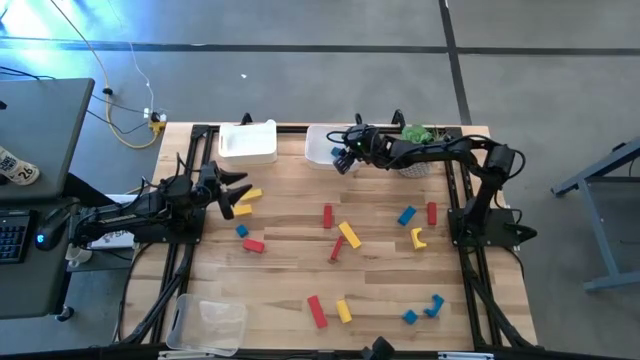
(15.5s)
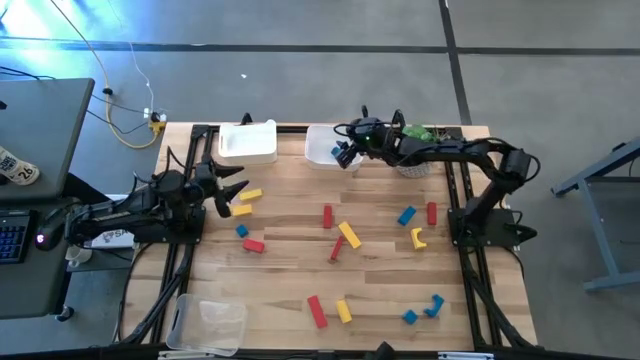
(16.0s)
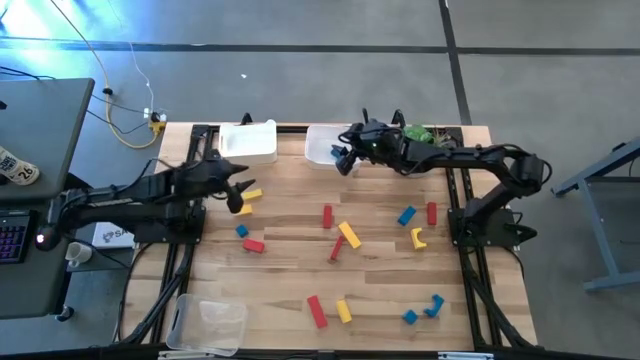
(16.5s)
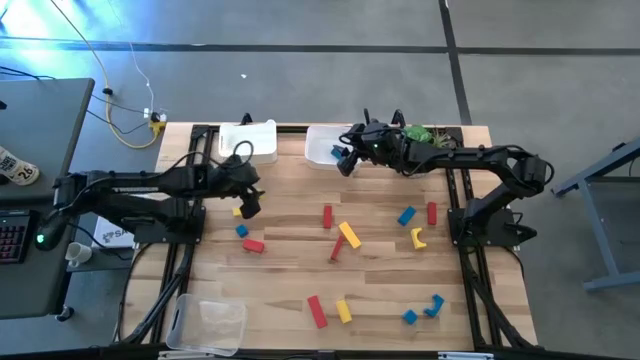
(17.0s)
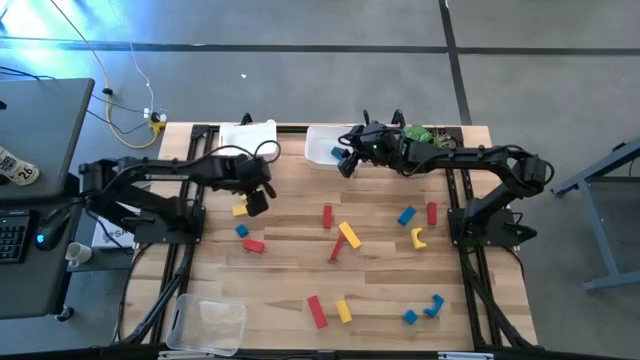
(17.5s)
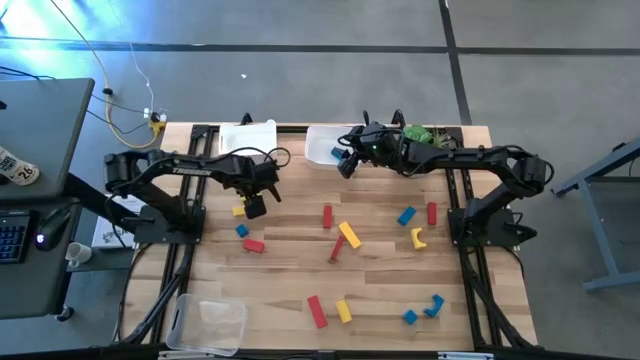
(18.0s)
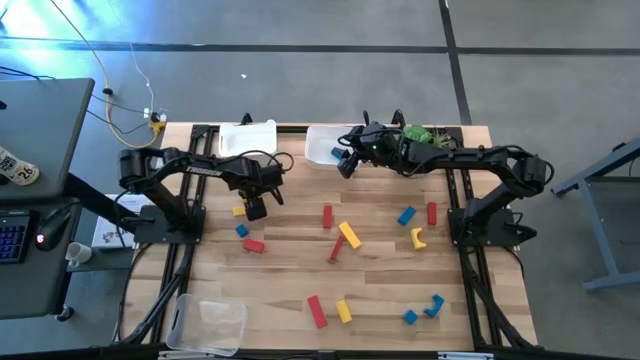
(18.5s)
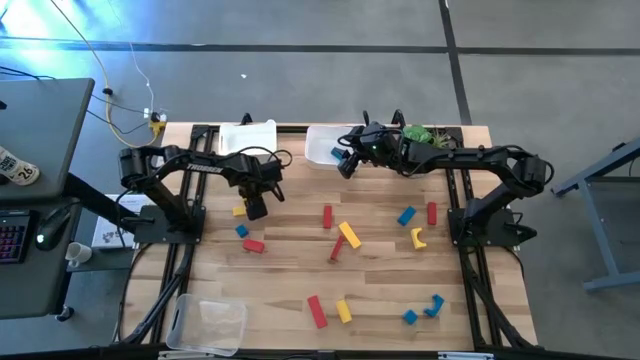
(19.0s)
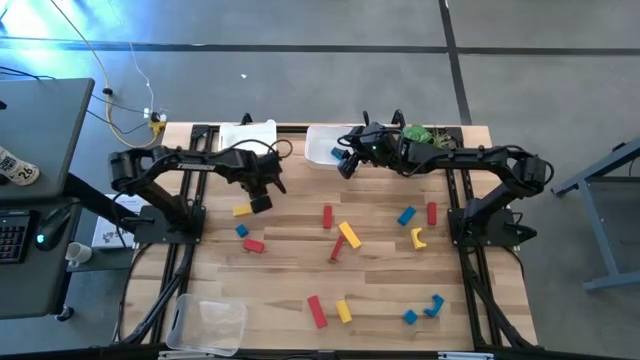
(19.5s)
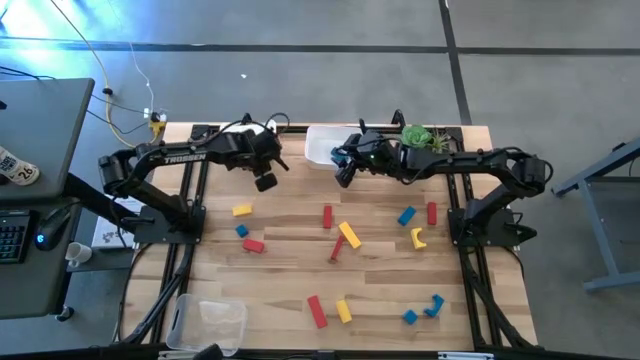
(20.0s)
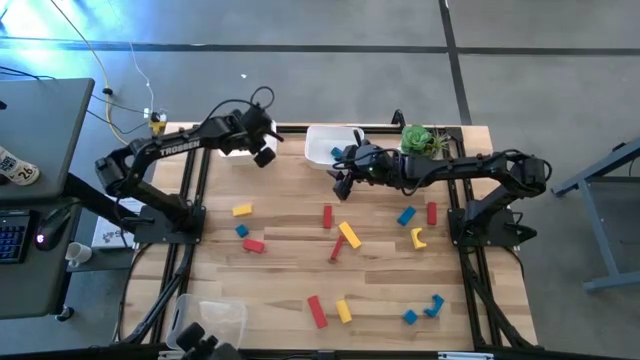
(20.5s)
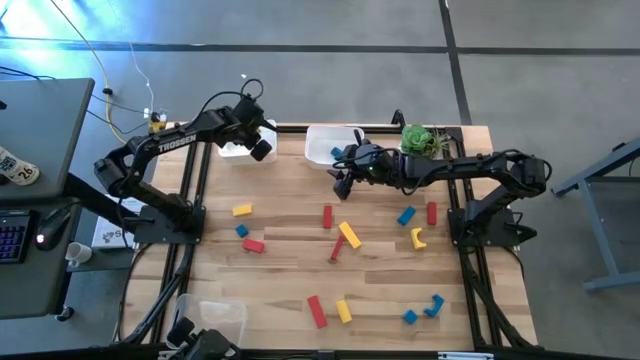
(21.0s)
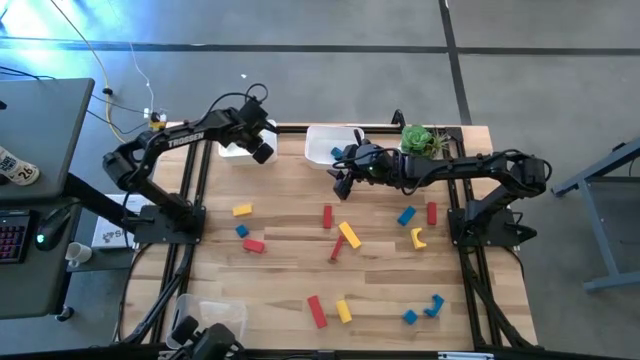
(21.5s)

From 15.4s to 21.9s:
Task: Sort & place blocks by color
Put the yellow block into the left white bin

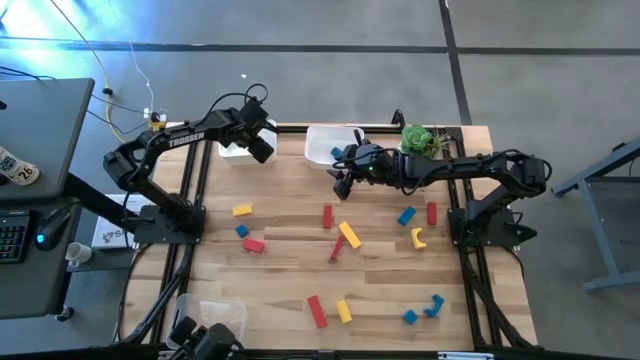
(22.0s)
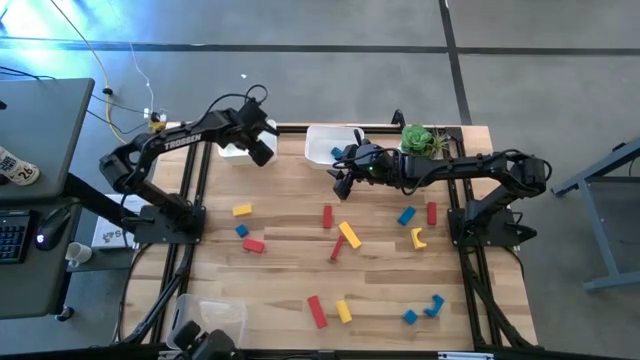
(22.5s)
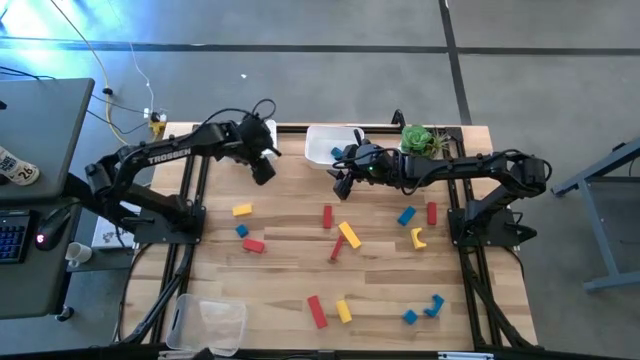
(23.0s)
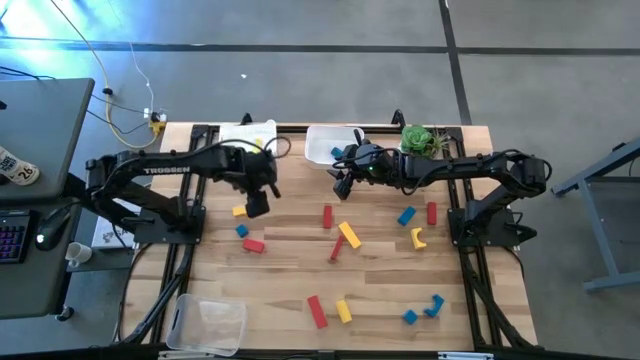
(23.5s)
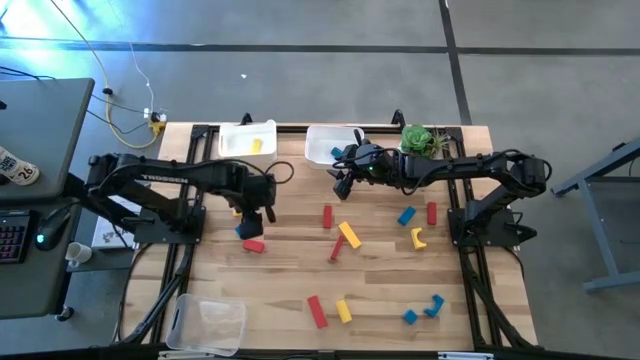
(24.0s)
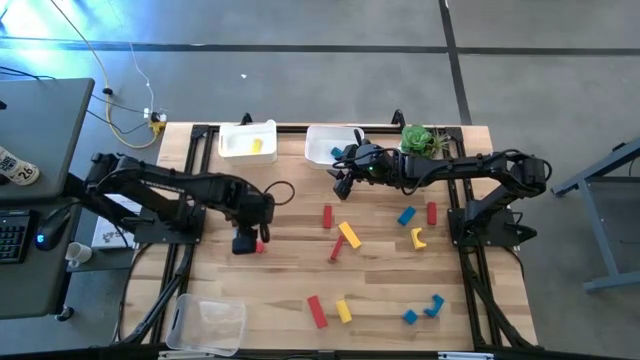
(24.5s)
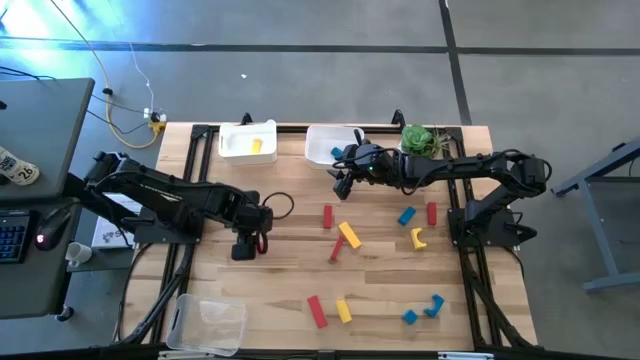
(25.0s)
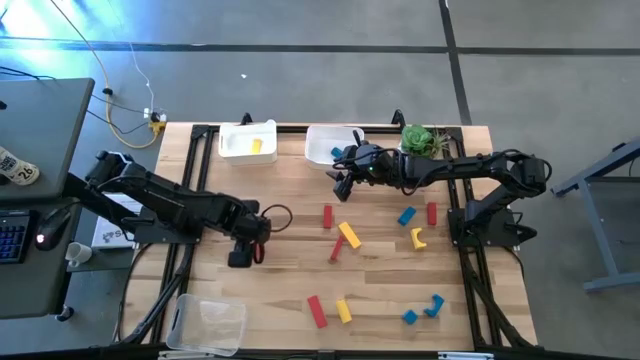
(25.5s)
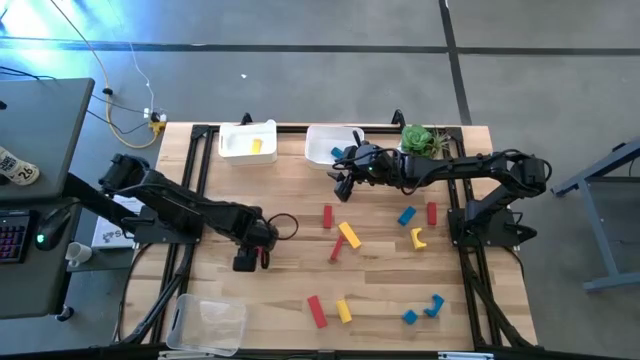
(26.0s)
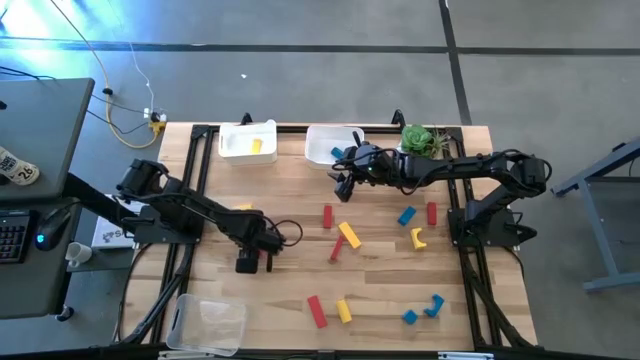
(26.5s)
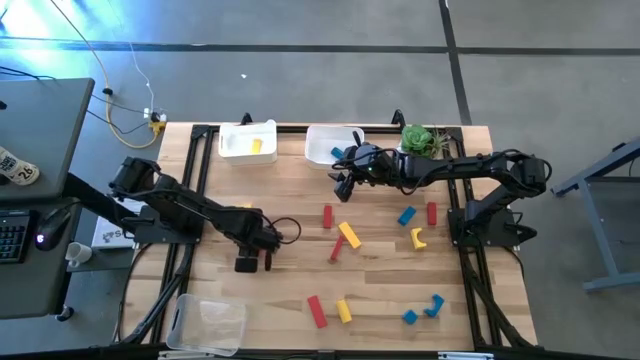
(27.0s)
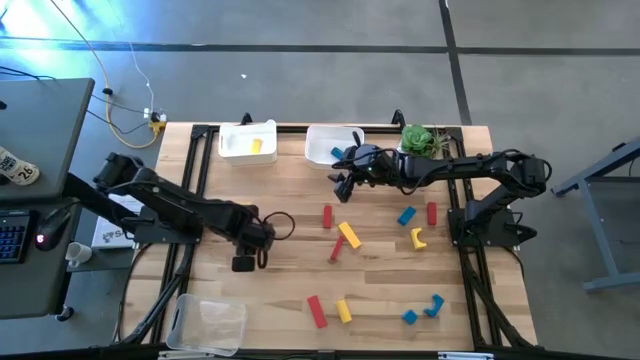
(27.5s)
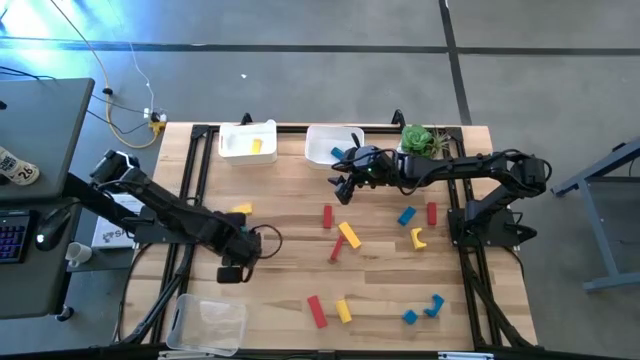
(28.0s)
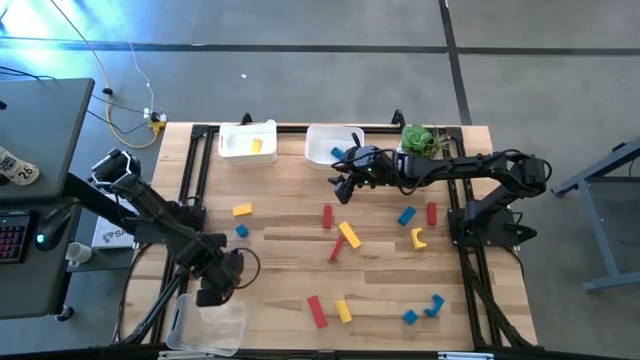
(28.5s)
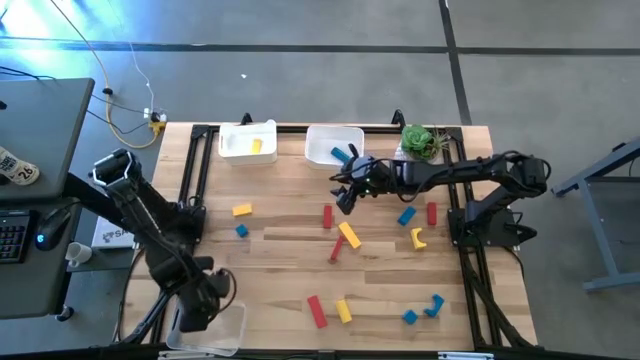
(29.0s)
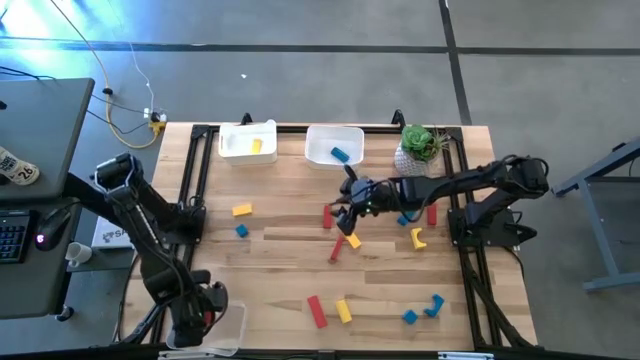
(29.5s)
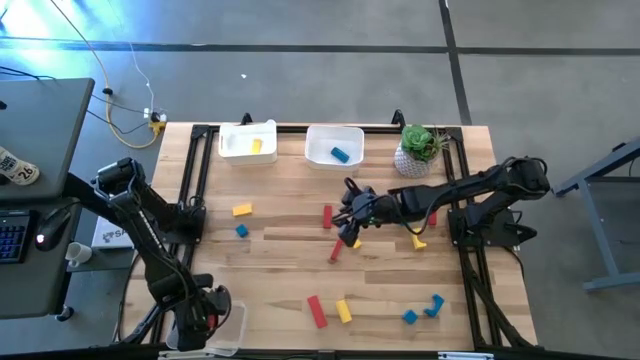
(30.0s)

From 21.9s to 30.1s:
Put the red block into the transparent bin

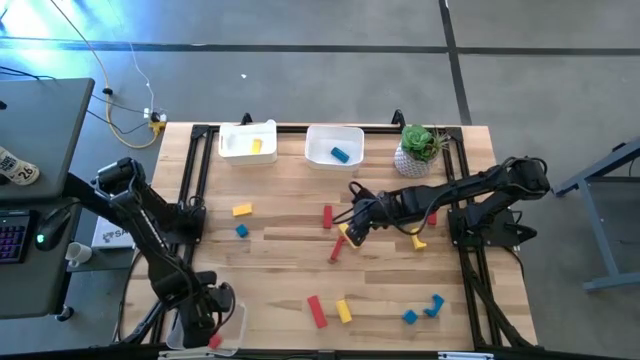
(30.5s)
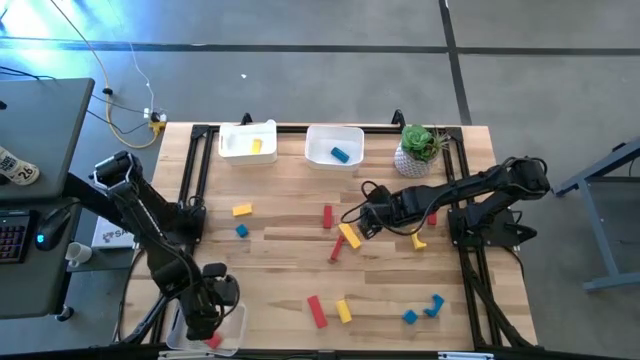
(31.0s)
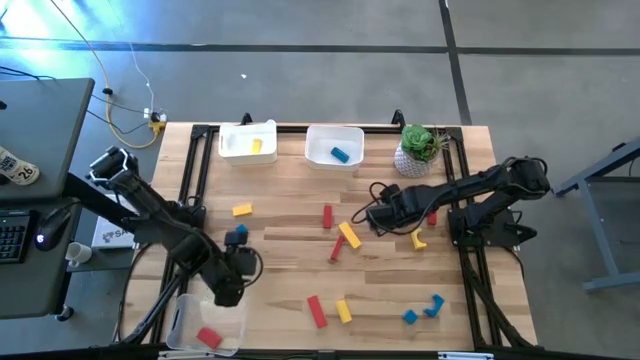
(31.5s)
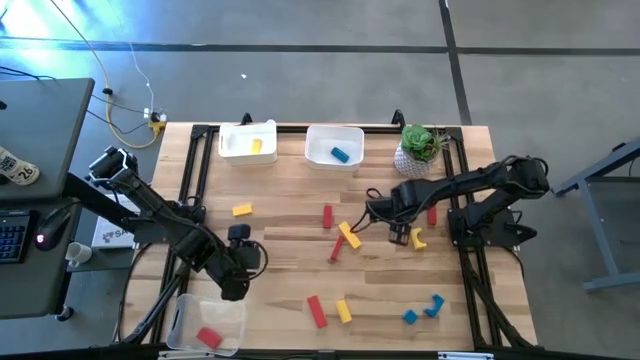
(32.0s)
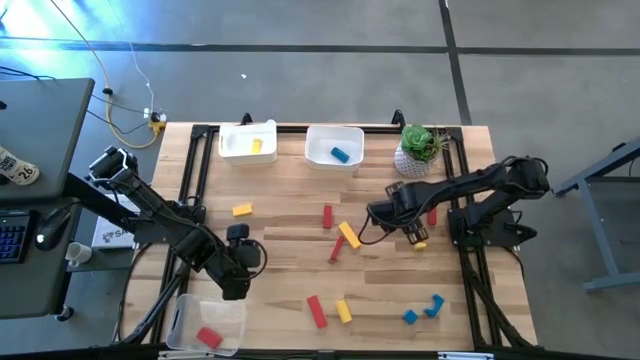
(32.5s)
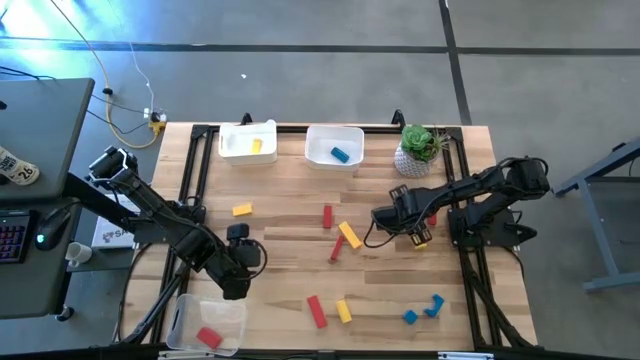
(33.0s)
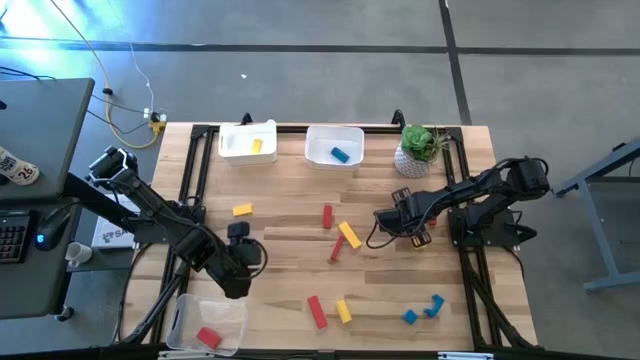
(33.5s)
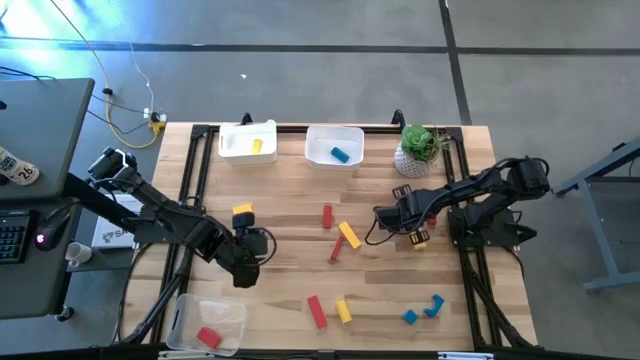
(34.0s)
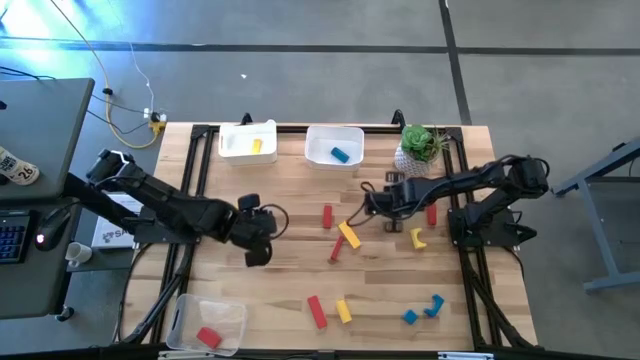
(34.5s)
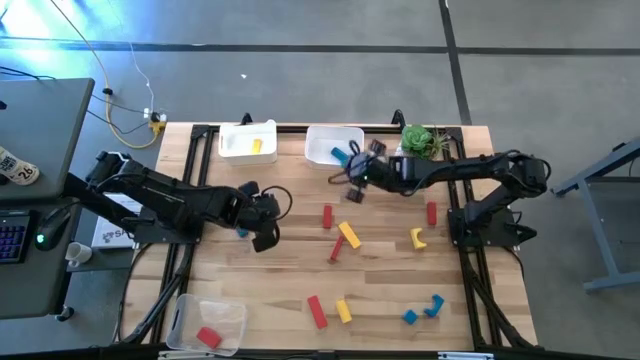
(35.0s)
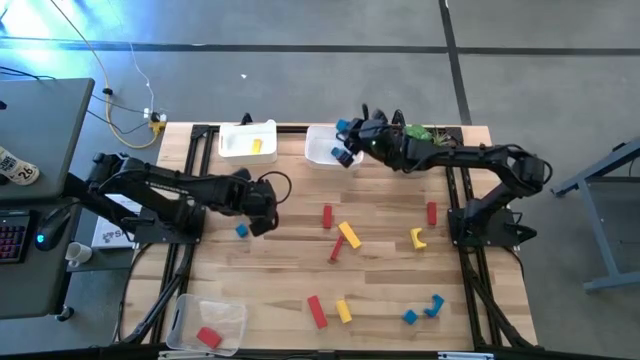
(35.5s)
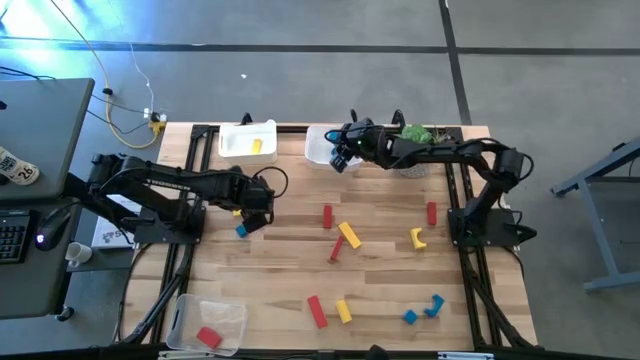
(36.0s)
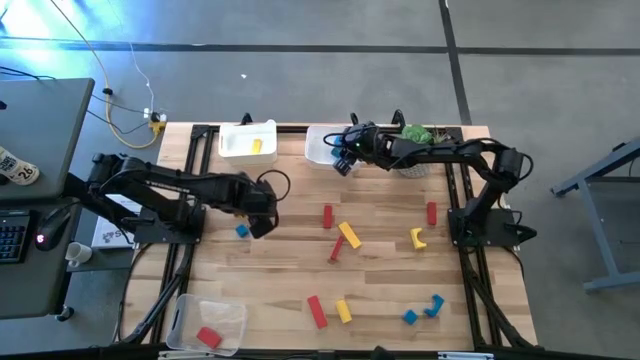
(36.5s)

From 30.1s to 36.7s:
Put the blue block into the right white bin
